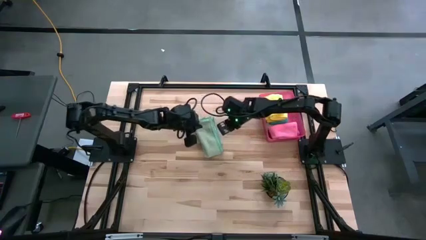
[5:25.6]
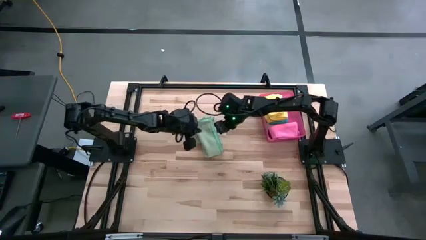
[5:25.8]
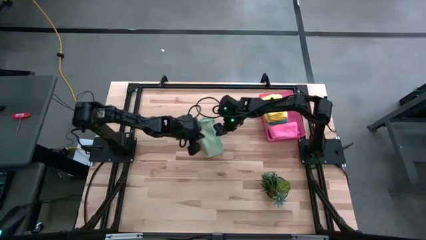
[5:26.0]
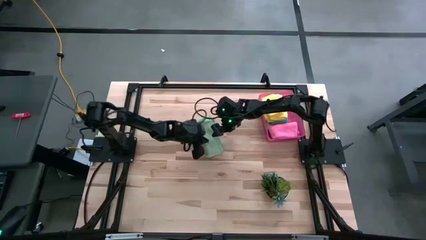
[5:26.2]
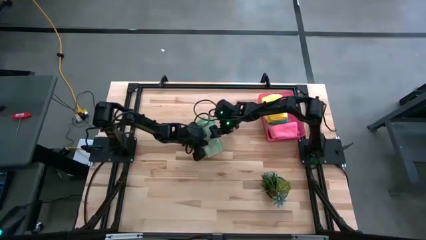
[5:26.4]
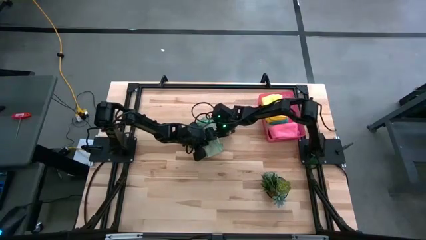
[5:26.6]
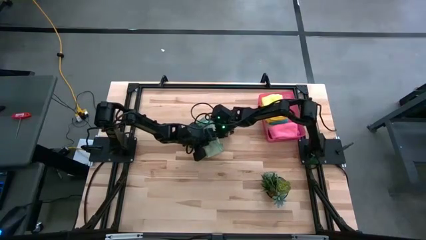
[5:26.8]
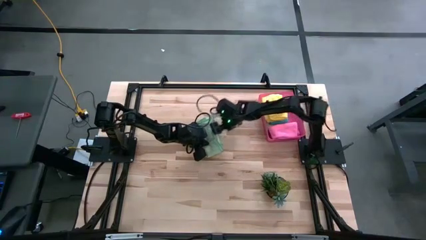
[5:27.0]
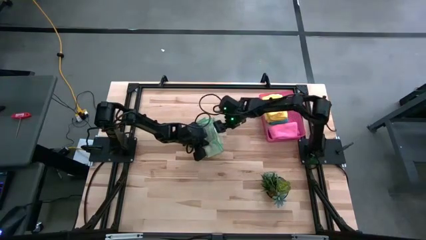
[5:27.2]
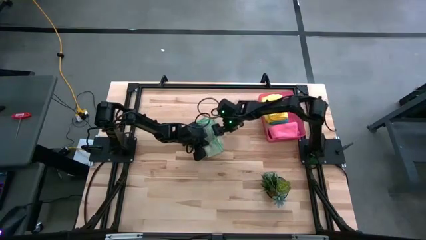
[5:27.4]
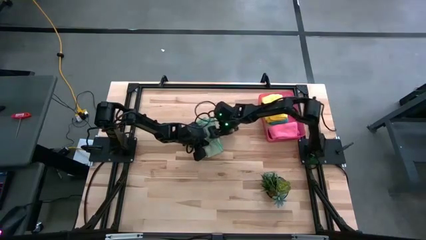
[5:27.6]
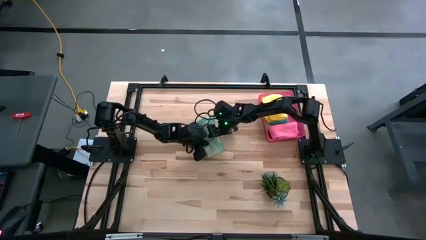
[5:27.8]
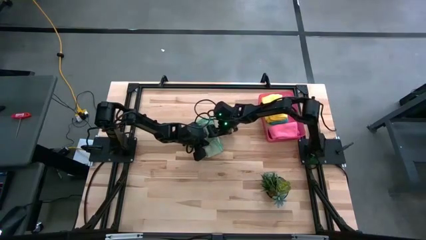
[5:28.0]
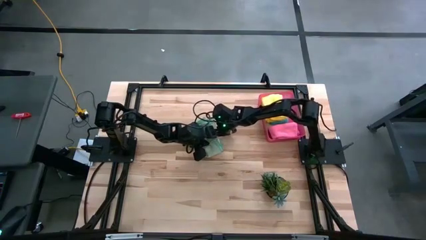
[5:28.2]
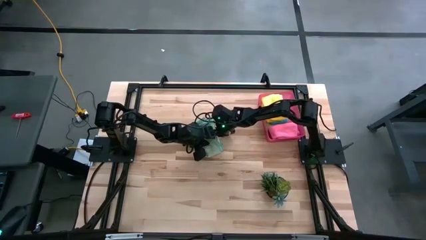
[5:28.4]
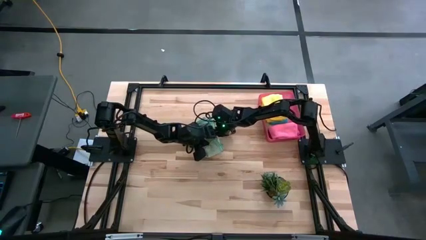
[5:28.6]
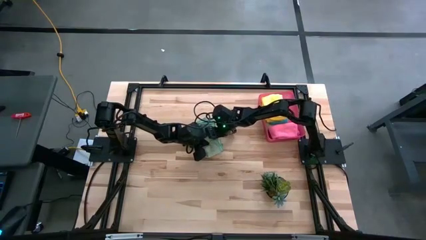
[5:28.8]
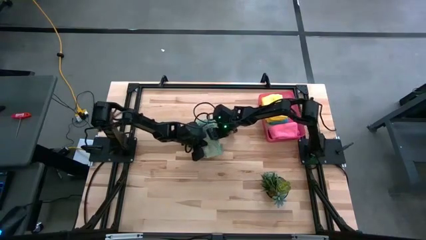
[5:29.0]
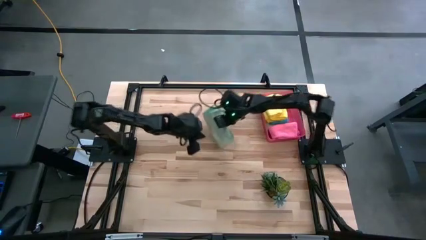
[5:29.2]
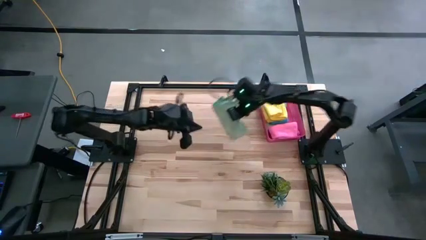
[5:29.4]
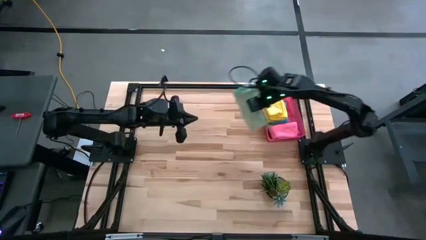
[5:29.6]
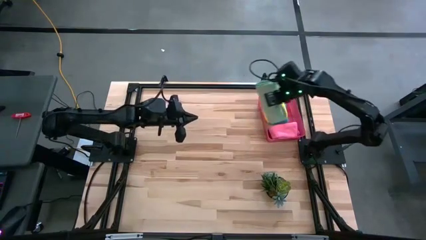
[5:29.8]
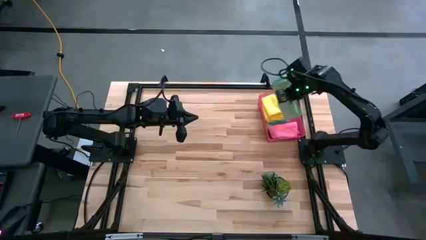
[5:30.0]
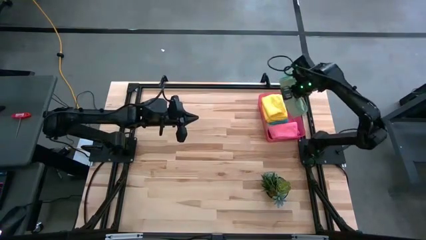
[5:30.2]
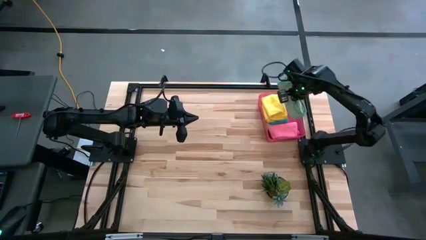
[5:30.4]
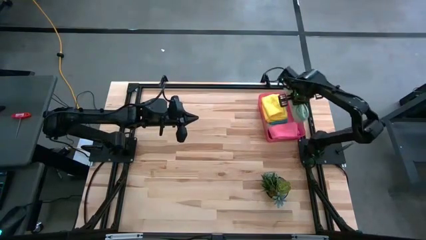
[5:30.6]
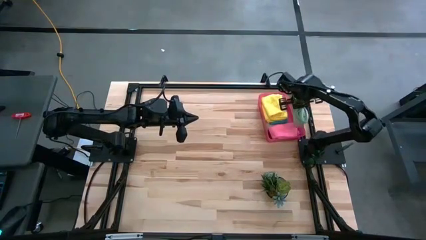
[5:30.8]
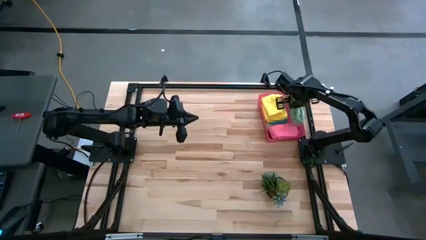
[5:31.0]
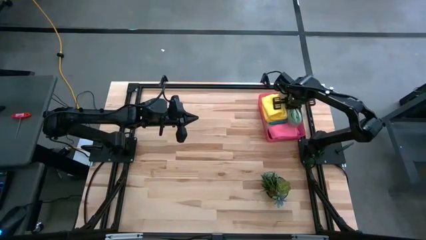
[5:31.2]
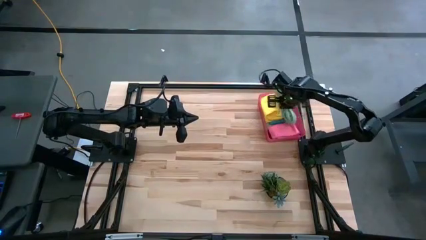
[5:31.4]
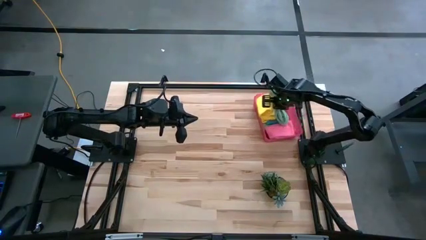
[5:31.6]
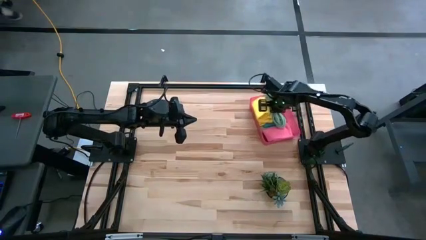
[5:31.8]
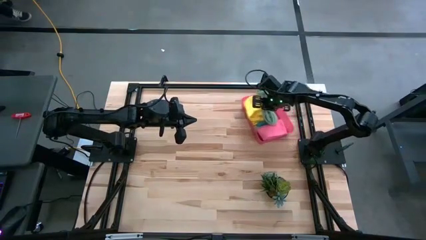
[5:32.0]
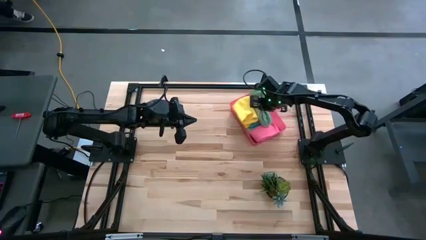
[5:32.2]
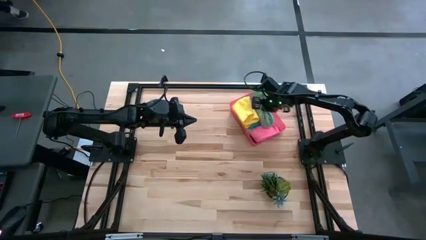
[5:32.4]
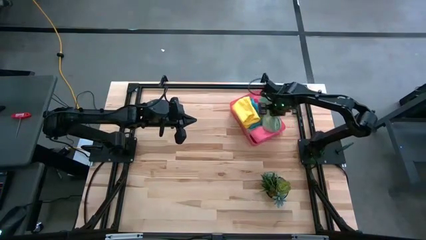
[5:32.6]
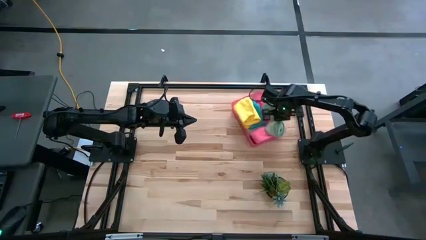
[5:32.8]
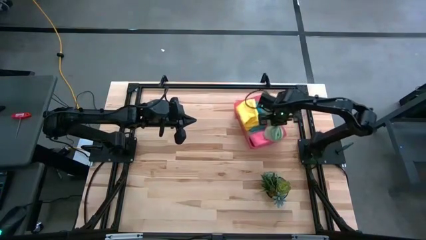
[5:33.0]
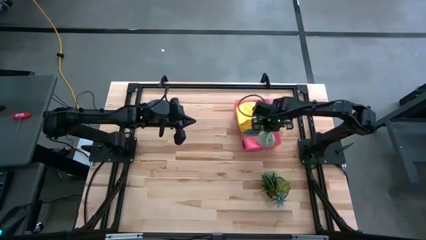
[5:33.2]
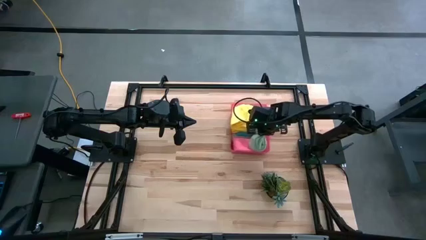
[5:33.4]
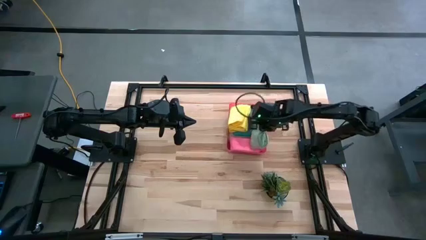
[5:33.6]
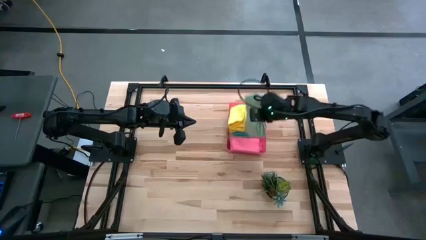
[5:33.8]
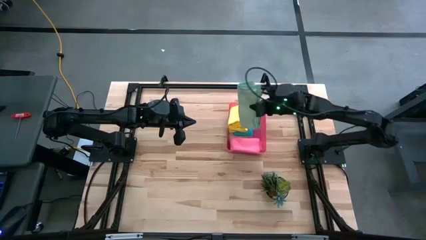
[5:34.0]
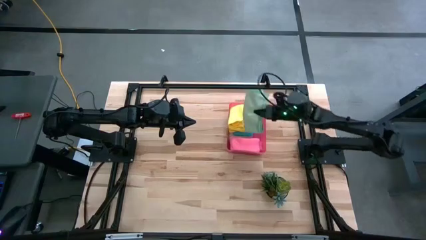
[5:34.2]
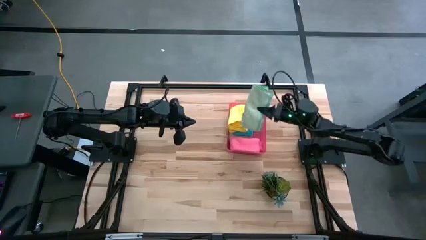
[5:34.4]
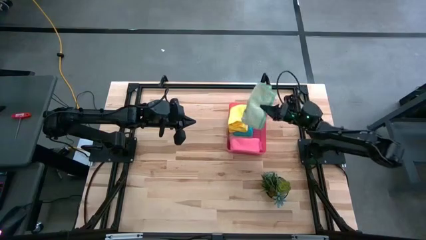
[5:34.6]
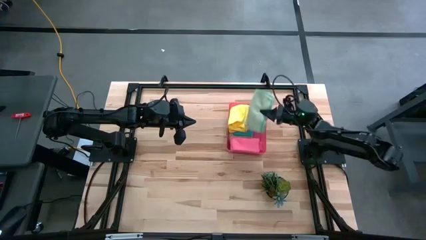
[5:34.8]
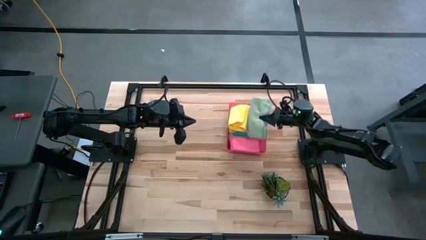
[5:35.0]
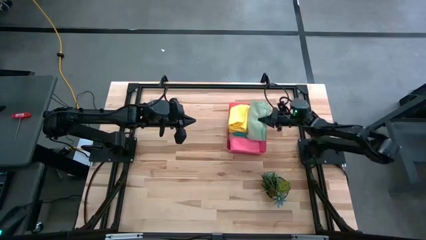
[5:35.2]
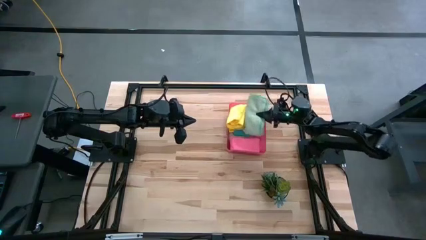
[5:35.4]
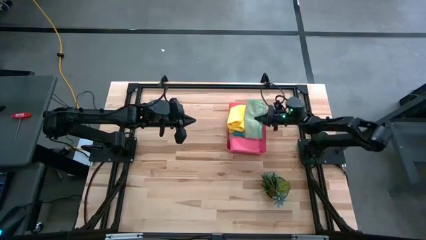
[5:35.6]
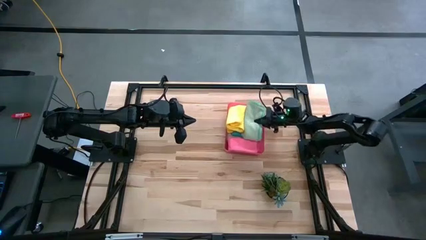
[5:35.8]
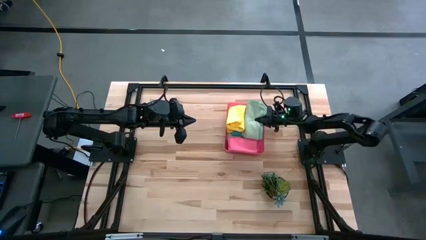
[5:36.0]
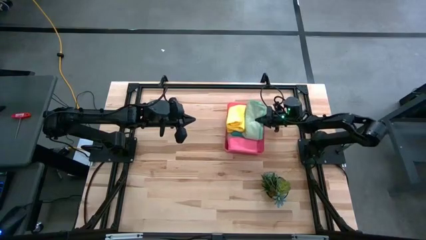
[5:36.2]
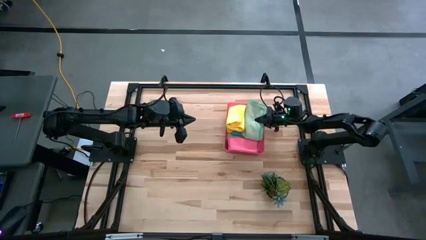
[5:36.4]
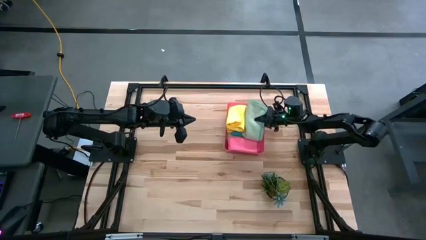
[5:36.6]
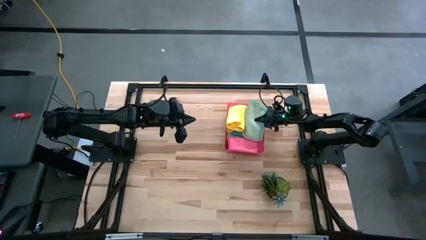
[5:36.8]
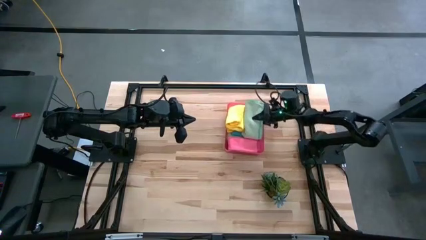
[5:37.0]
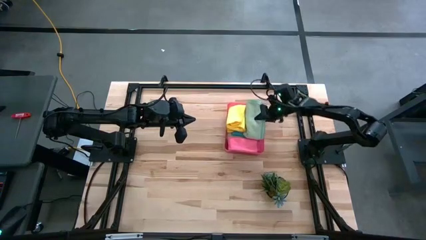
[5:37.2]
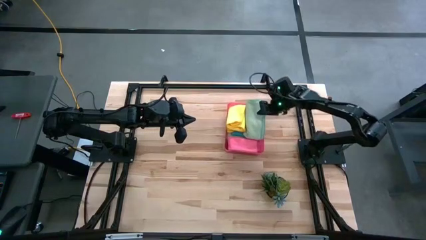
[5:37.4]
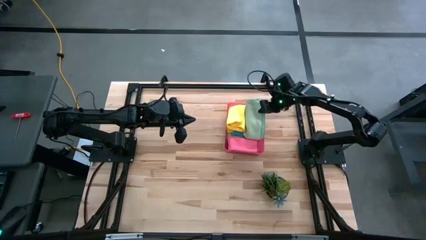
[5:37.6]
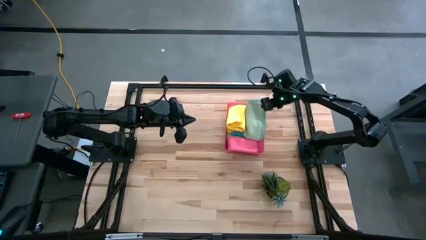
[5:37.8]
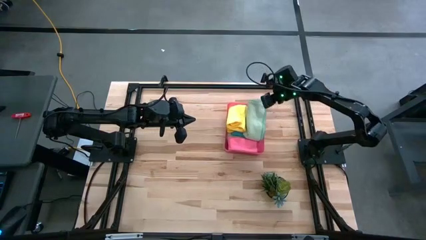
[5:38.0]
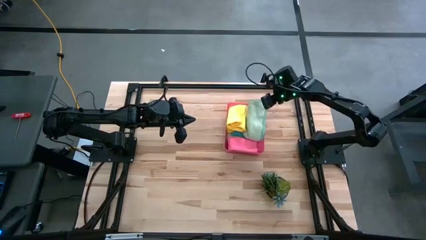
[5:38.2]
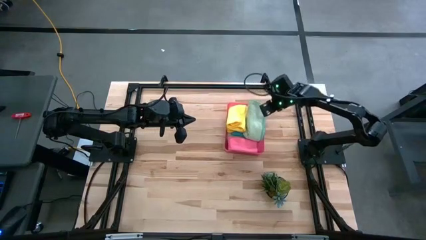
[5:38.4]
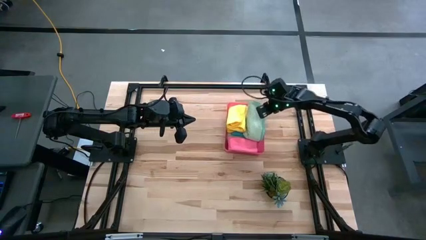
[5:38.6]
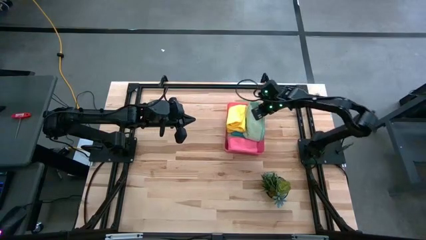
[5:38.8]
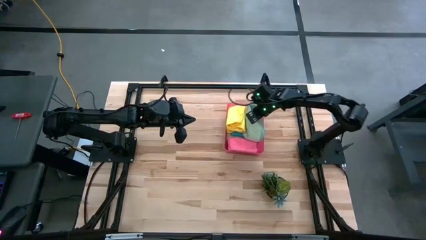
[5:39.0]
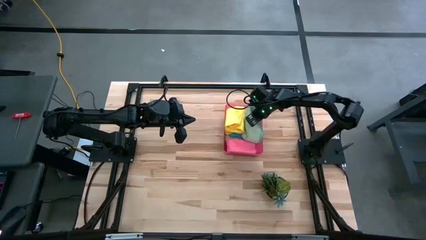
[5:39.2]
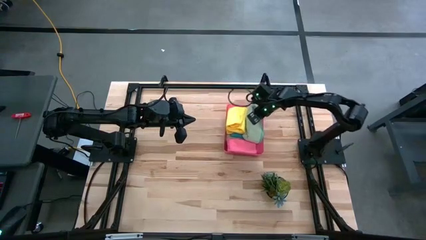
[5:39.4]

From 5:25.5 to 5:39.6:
Task: Fold microfiber towels
Put the folded light green microfiber cloth into the red bin

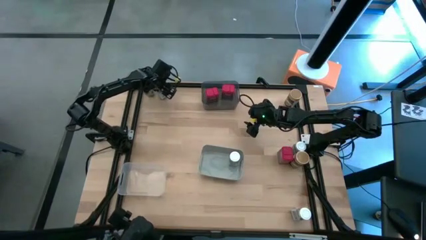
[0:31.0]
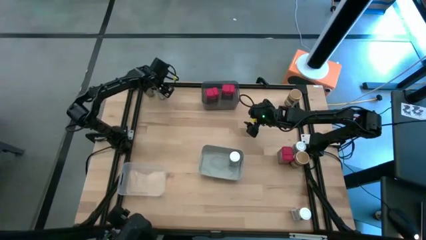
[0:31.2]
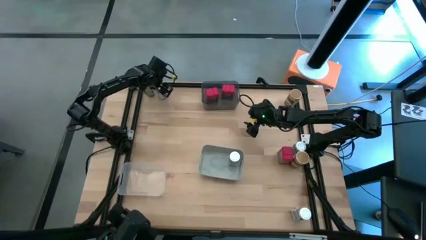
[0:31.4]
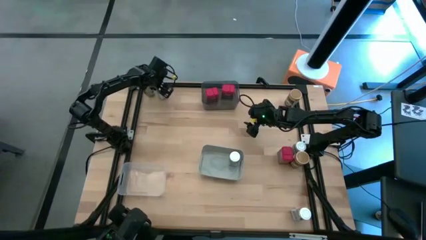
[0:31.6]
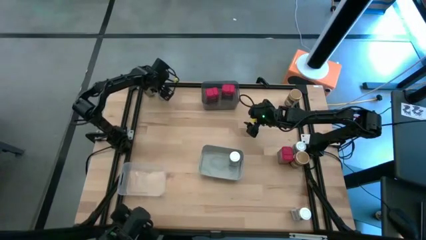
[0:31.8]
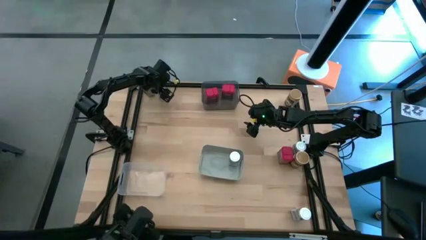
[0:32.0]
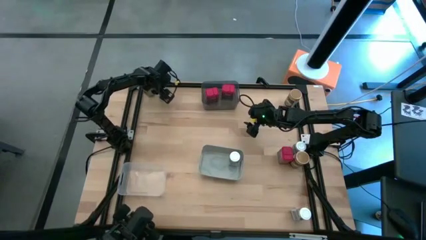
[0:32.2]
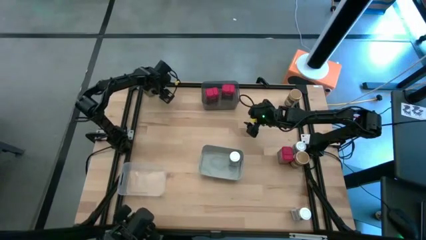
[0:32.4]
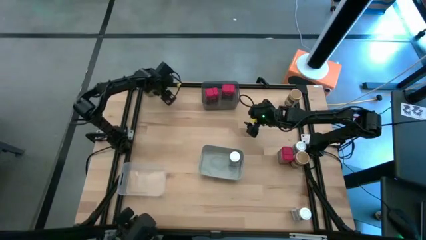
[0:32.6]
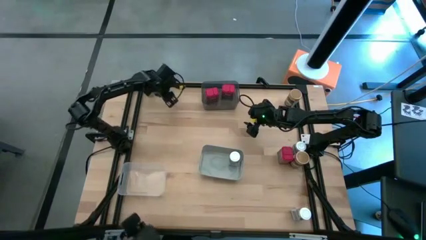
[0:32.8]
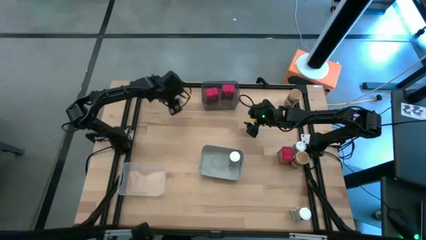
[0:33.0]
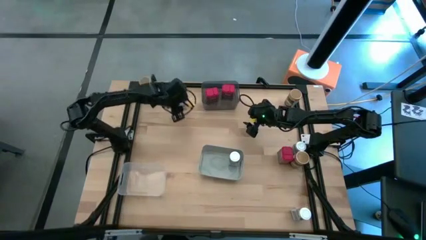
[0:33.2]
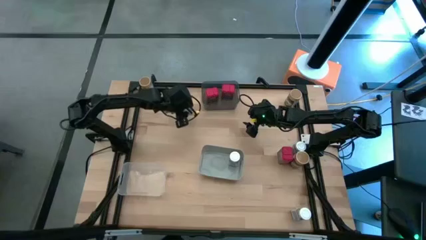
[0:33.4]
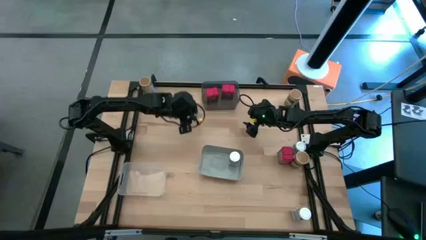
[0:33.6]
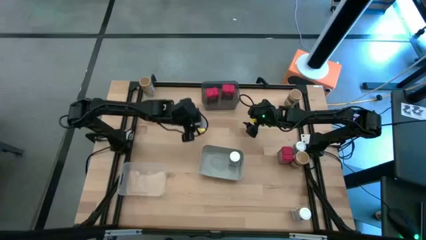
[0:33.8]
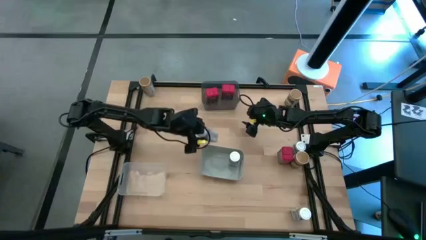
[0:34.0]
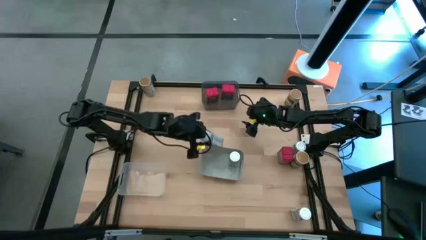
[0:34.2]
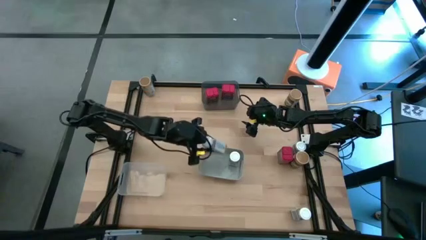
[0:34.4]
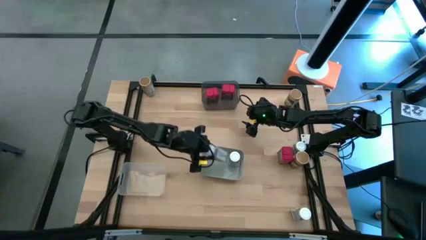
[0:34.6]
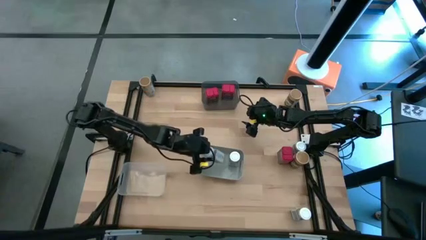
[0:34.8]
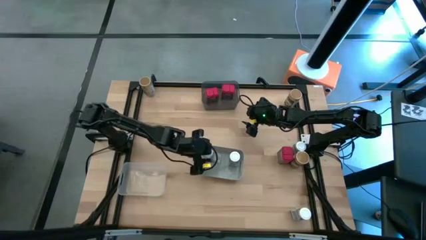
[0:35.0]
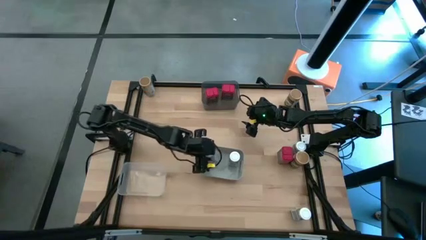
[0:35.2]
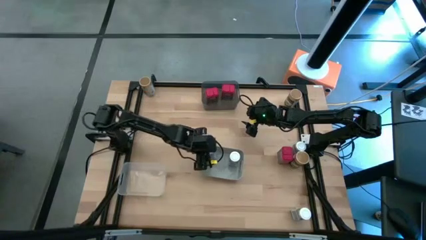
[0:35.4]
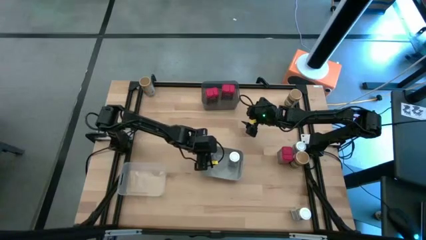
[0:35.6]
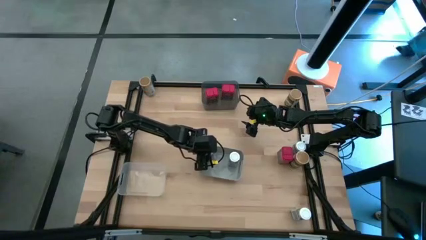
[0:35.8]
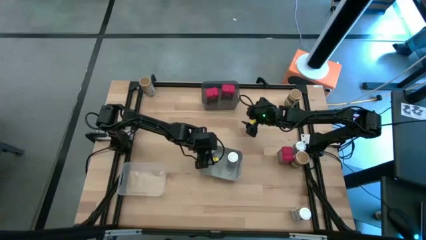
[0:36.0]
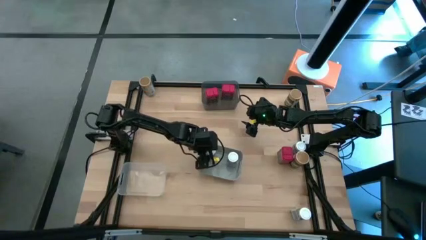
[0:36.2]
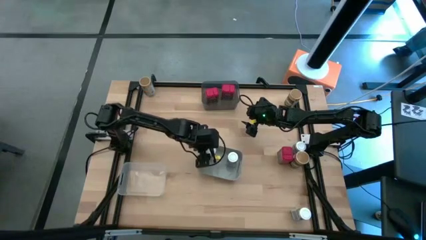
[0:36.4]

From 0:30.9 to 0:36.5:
Task: Sort spices by type
Put the left white seasoning bottle into the gray bin
